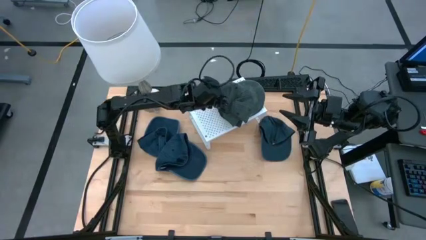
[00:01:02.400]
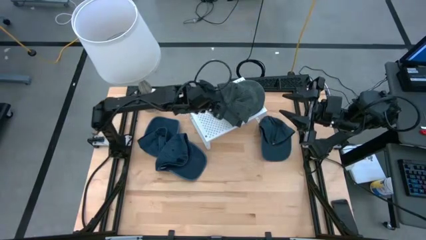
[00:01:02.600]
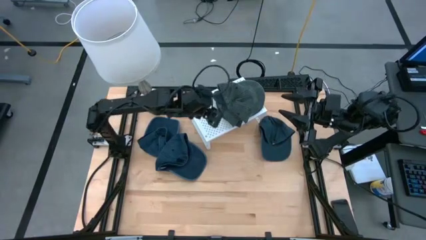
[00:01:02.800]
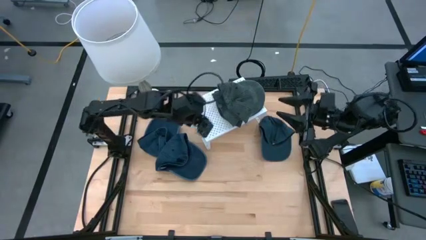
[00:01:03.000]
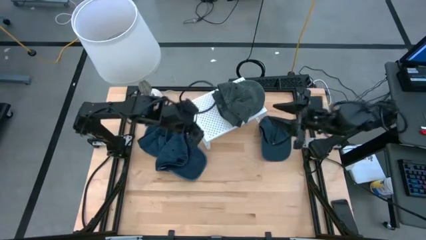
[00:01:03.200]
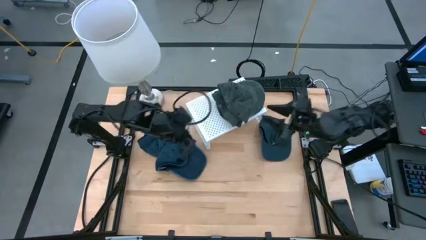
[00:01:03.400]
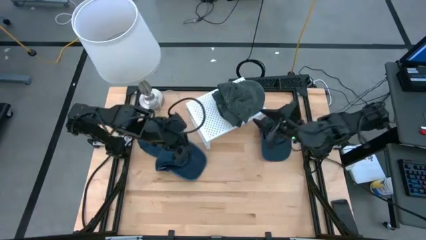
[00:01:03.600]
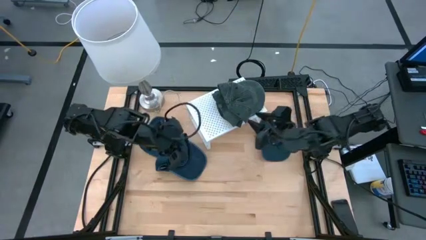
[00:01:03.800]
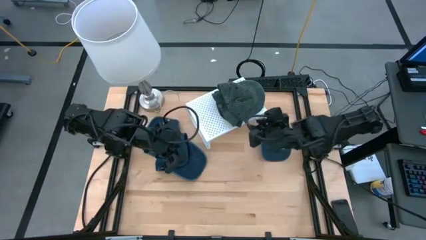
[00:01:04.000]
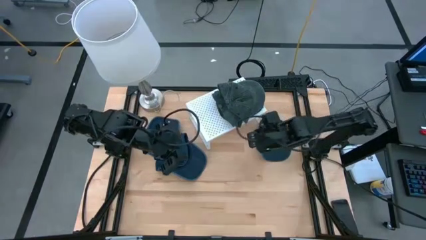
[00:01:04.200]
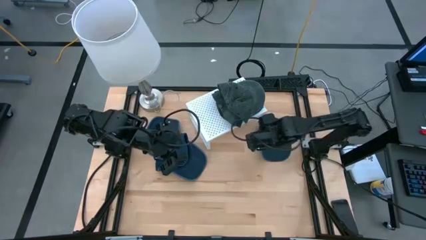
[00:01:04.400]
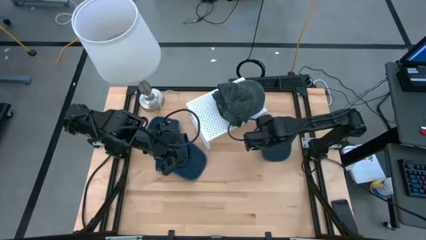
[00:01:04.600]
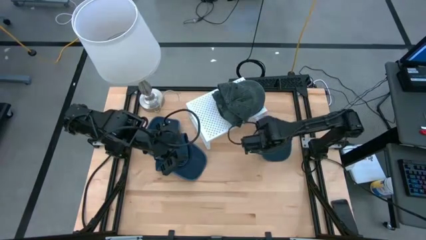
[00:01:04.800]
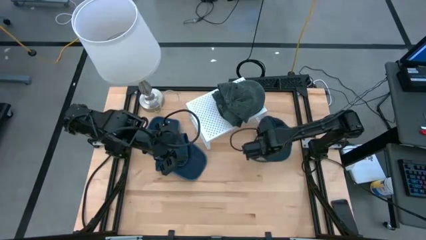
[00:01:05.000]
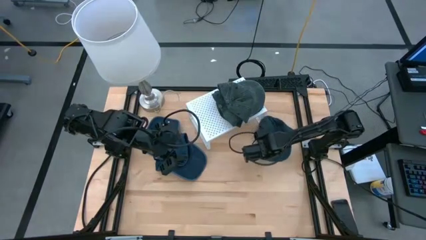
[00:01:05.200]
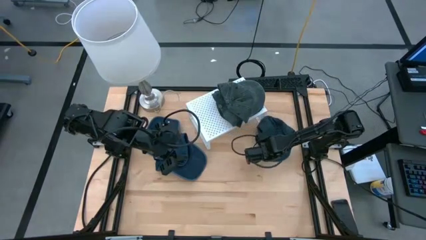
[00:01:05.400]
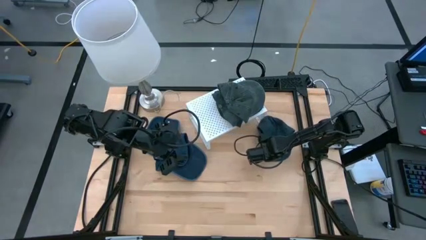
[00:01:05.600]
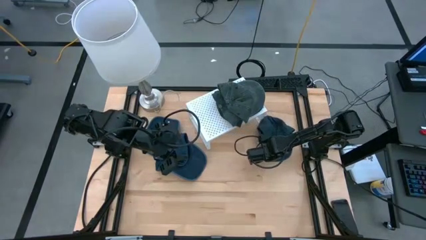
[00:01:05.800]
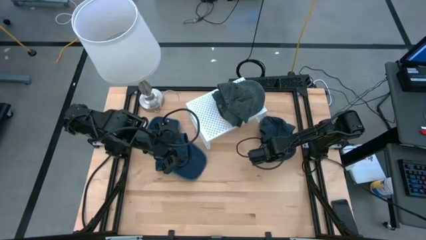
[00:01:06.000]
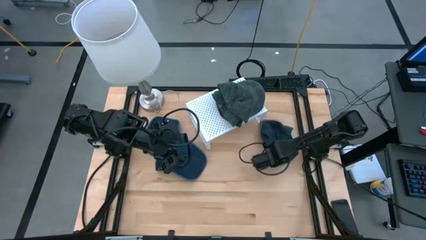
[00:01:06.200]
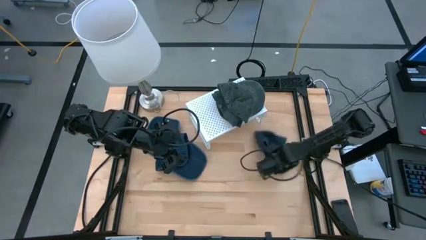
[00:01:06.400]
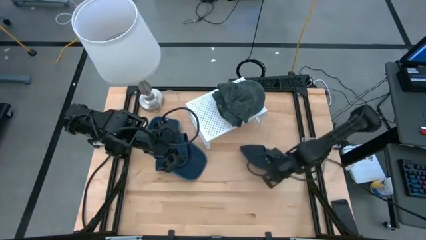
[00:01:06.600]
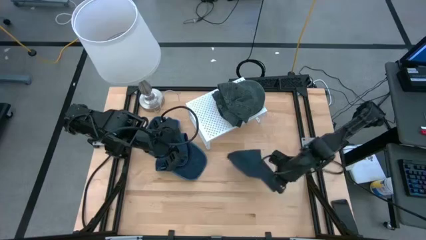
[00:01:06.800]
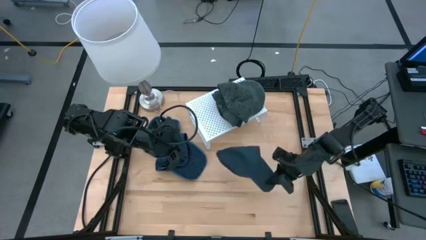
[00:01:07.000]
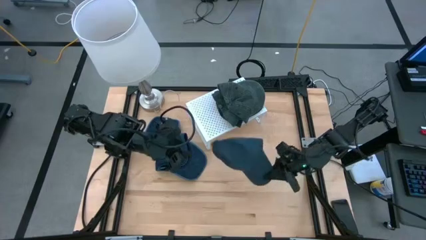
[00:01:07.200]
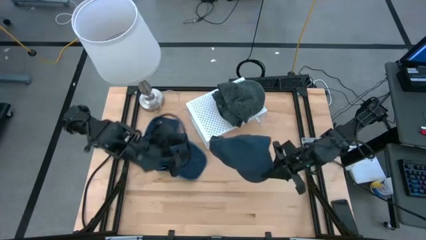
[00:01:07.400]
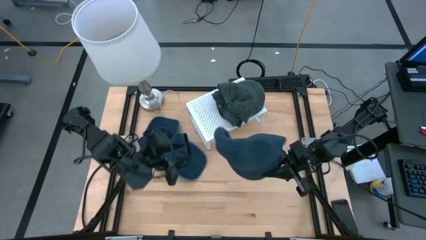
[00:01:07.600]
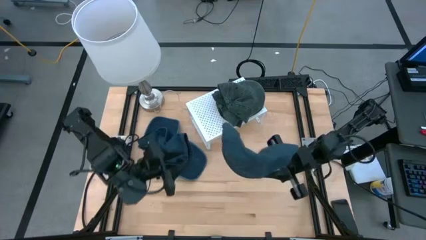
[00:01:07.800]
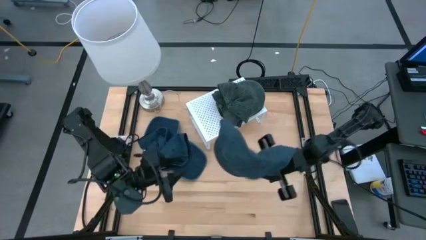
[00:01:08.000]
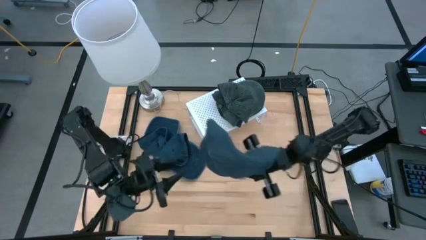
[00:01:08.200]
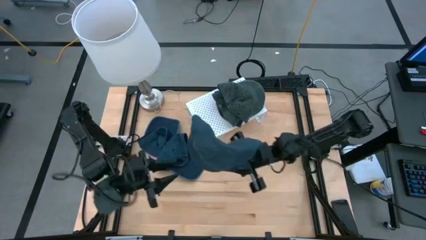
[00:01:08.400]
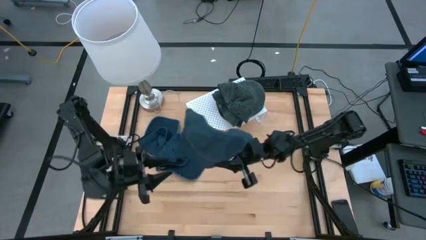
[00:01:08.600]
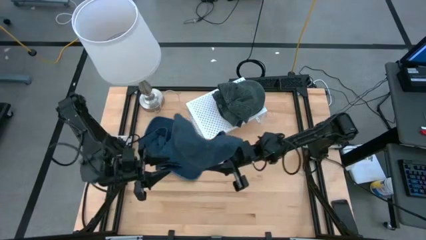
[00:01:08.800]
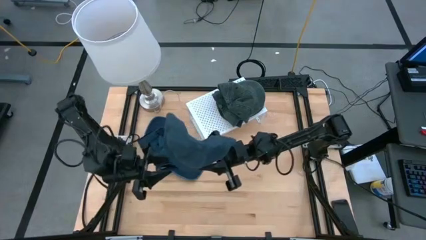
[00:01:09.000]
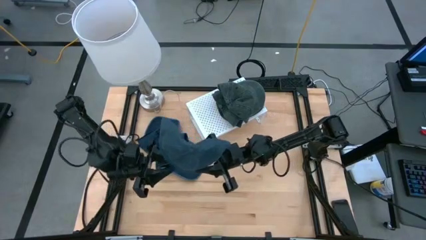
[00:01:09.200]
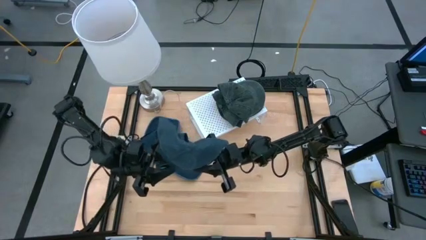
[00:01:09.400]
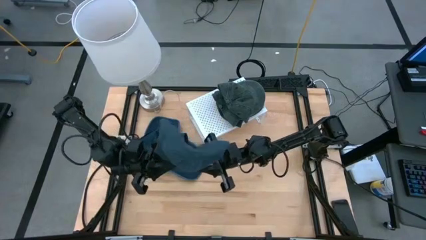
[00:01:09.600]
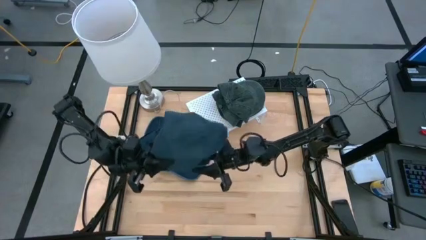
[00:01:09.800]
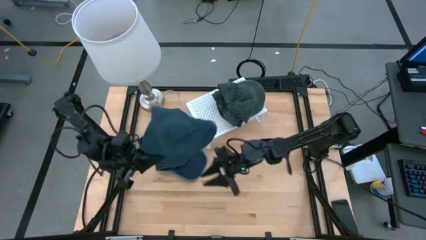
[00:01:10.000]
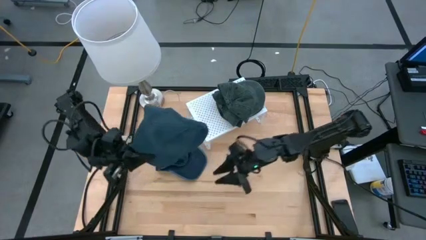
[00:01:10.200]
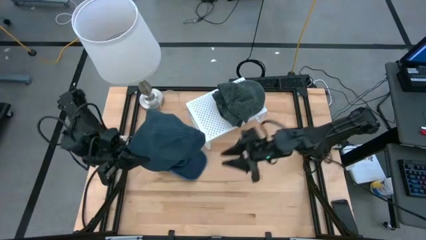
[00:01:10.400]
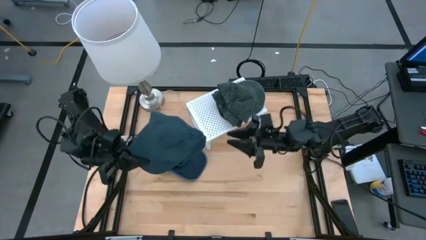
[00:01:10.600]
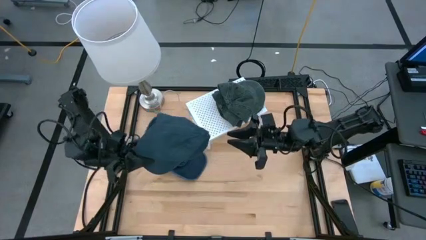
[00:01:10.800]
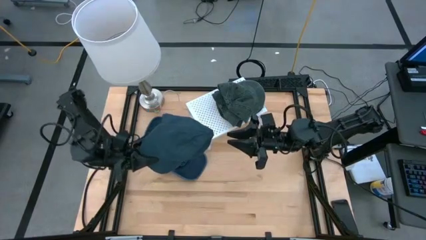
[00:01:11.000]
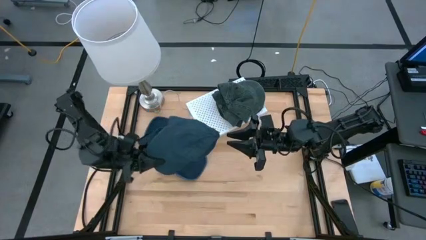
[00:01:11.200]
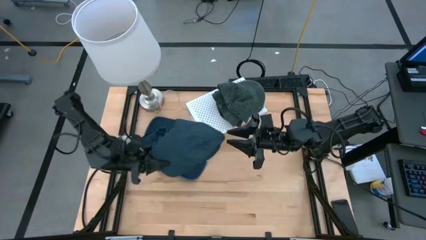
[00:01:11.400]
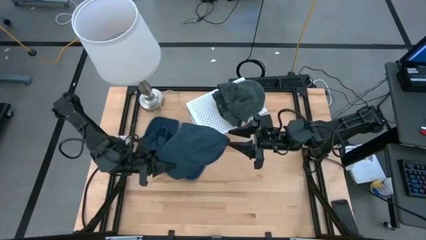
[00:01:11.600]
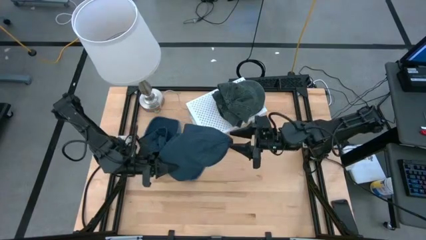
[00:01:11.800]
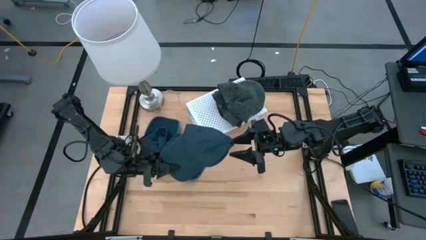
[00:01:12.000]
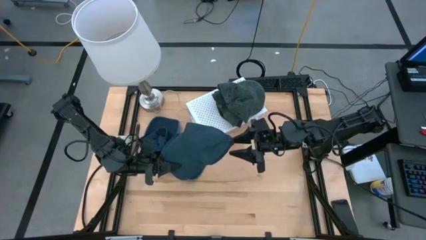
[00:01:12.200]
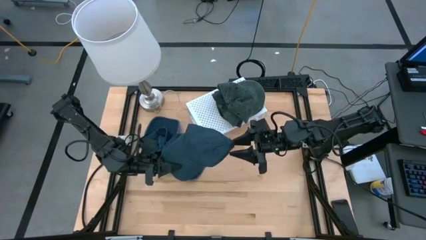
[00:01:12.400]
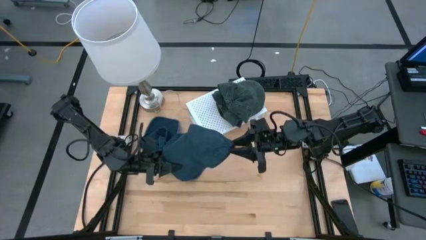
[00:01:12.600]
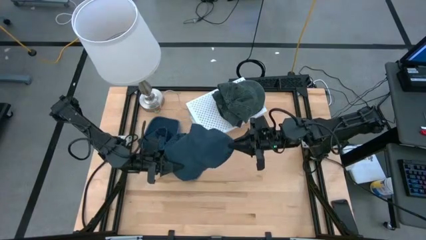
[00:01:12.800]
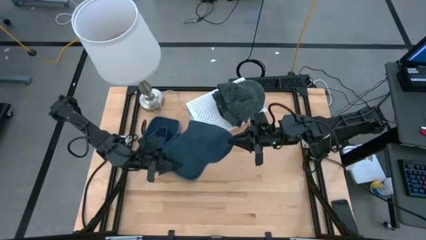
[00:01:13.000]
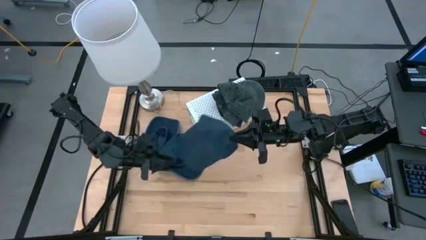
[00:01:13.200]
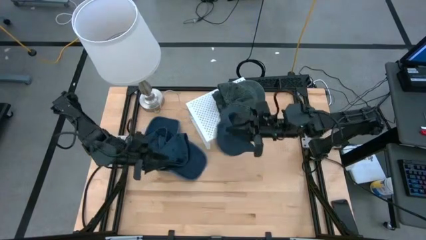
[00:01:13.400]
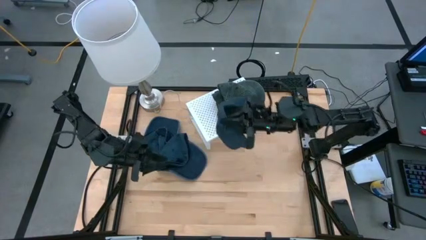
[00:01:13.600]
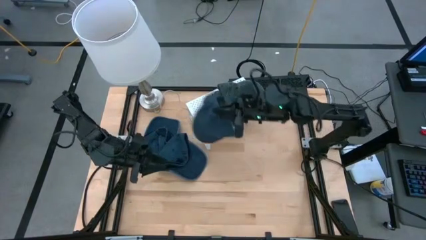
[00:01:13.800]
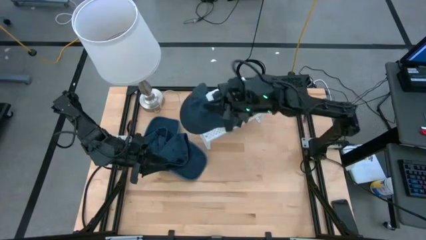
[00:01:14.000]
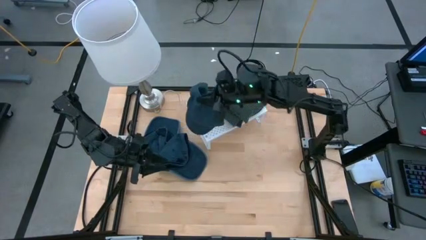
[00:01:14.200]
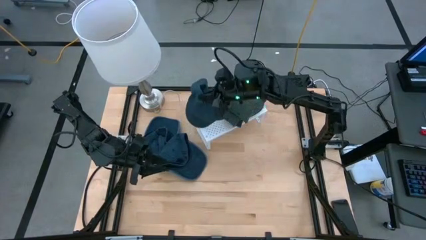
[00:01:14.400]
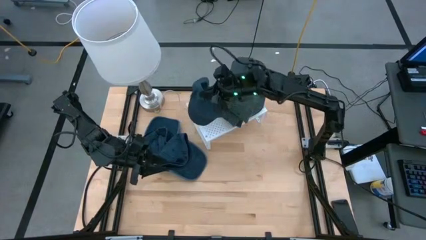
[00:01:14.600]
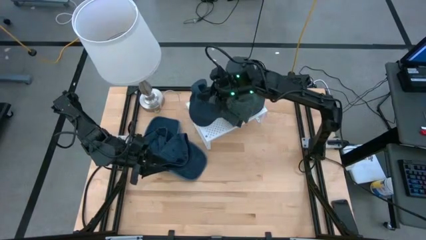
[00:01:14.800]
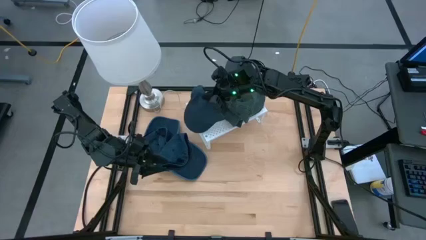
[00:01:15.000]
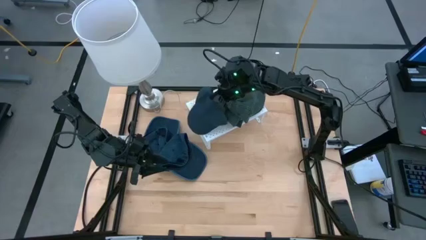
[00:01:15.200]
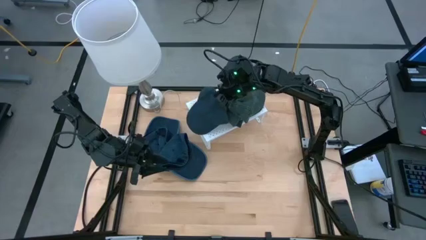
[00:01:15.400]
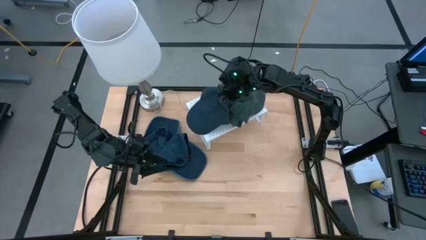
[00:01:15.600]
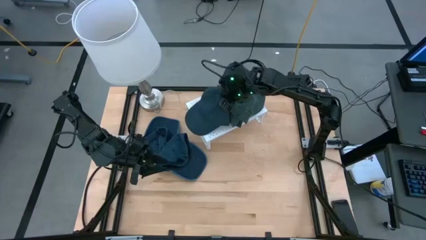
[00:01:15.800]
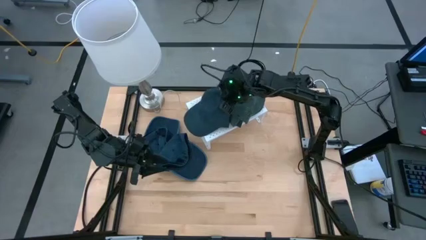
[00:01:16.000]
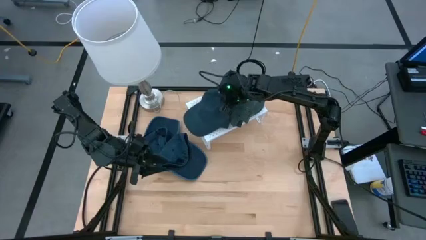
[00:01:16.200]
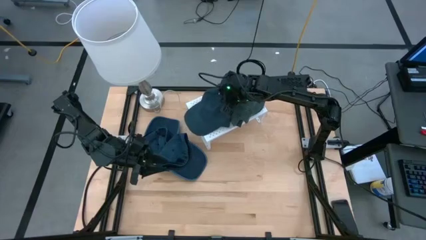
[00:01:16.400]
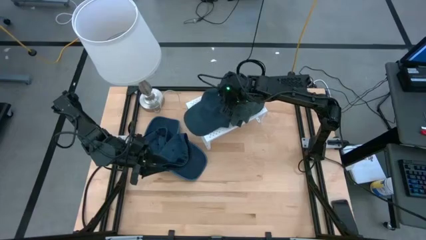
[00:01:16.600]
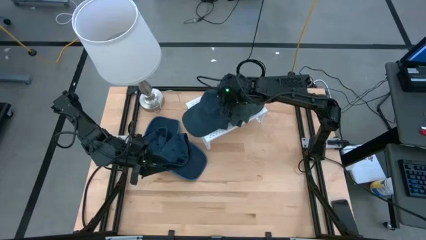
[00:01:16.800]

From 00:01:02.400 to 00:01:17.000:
Task: Pick & Place hat
Put the blue cap on the shelf
